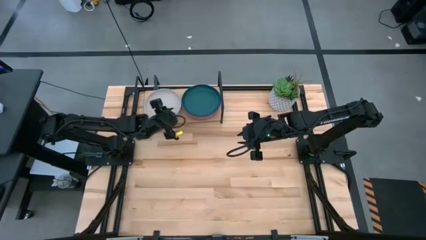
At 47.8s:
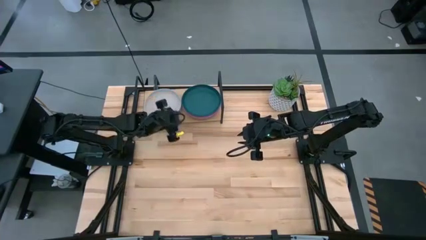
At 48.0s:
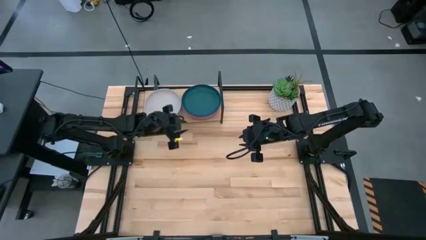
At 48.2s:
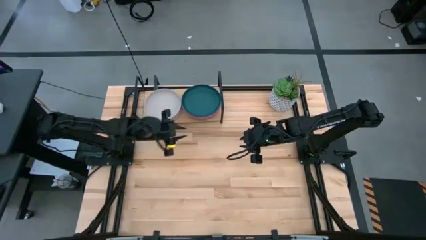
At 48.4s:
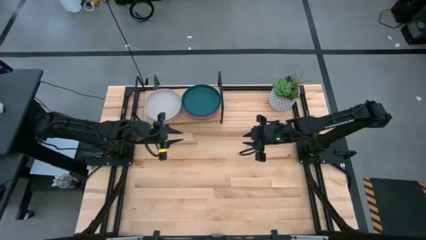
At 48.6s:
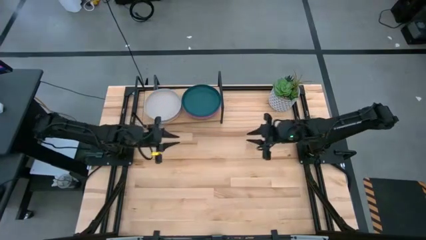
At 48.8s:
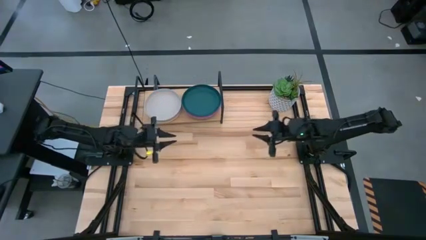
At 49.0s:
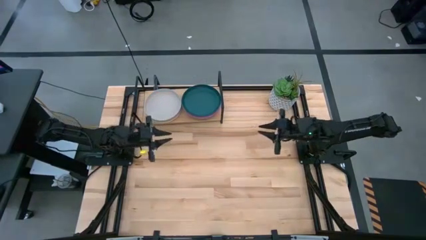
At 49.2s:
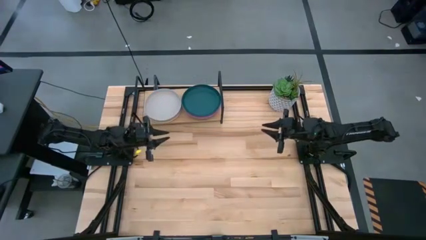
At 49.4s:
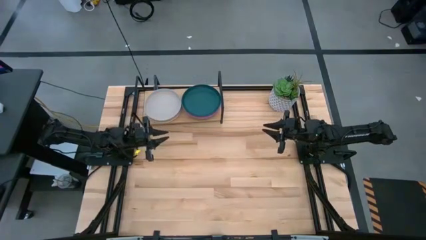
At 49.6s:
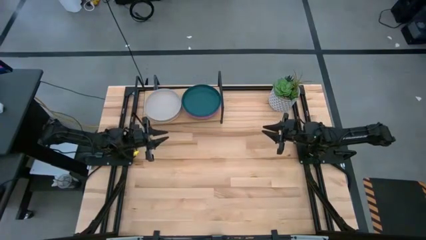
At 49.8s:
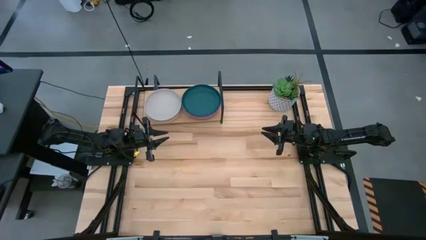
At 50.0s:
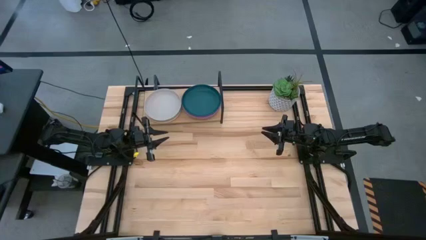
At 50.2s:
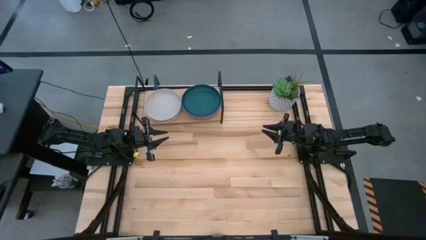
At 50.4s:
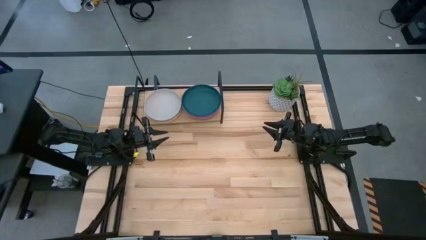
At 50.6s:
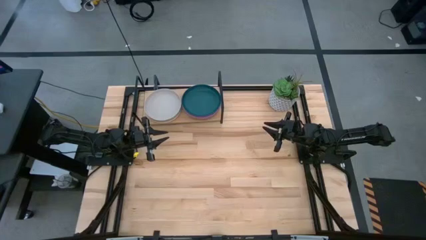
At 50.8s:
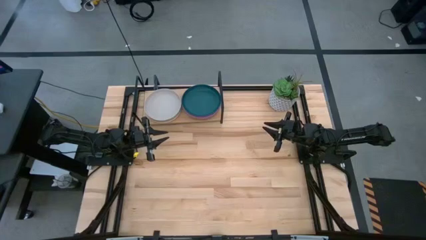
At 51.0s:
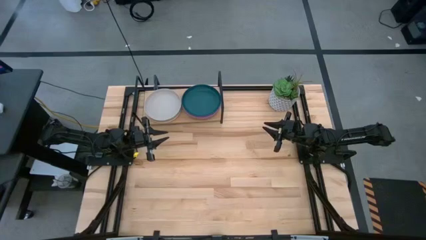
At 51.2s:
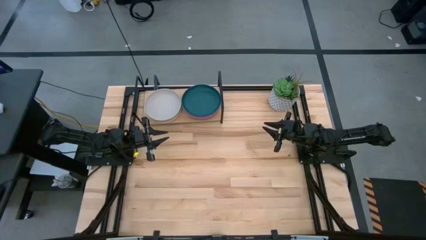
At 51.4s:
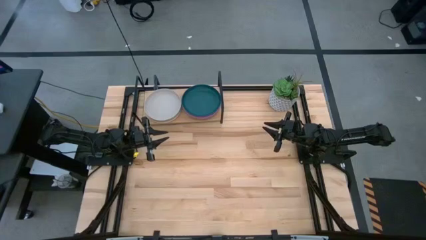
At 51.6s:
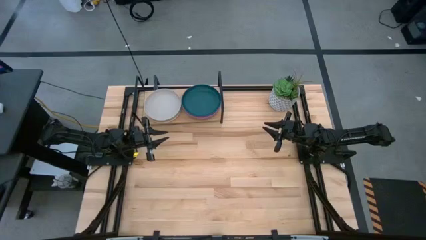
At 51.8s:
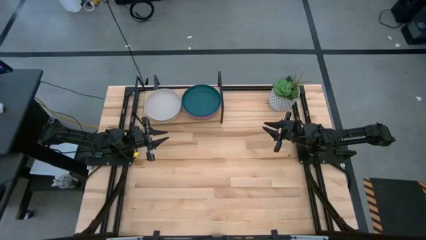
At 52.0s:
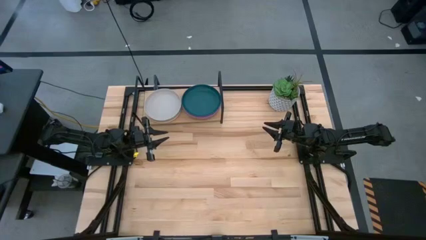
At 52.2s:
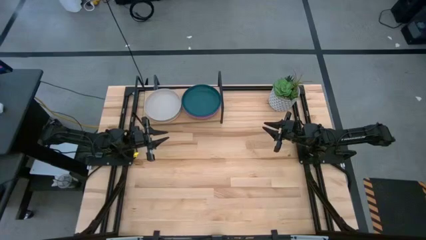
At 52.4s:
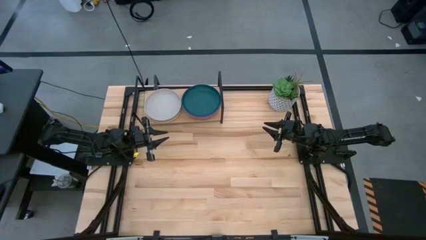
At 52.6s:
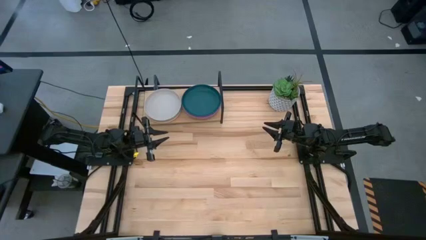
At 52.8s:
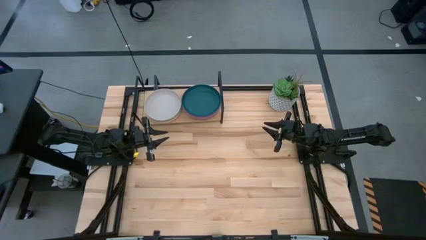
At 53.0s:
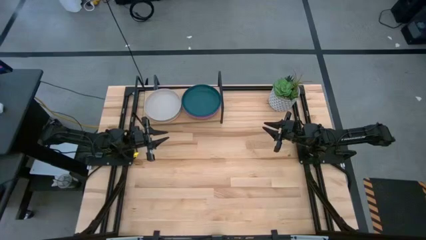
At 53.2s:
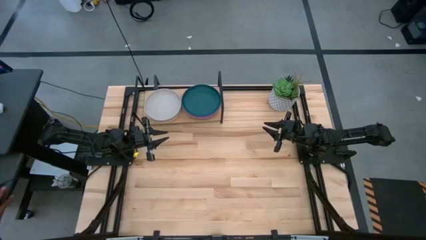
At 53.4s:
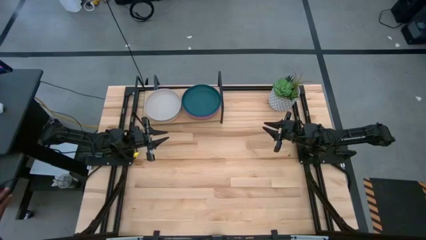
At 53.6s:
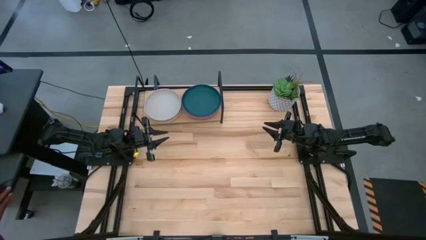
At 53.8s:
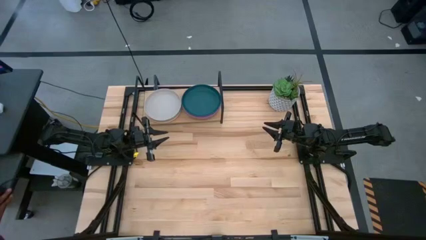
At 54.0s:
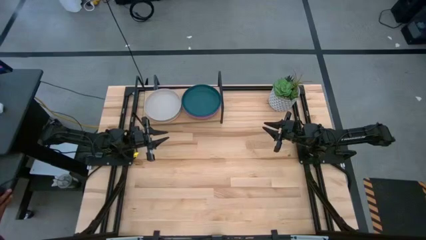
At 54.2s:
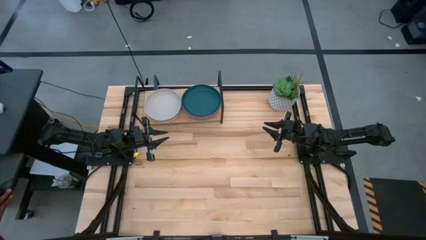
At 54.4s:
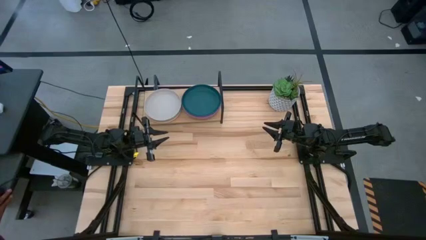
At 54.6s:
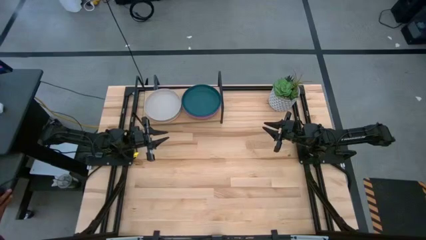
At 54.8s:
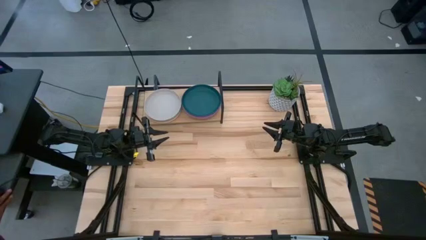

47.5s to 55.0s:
Task: Place and stack plates onto a shelf
Return to Home Position

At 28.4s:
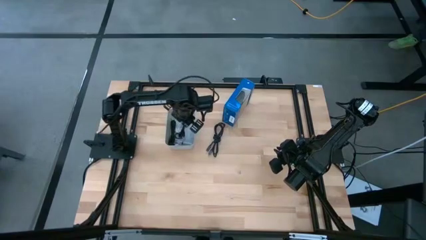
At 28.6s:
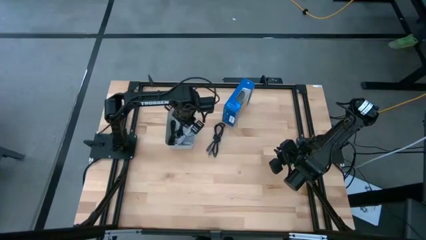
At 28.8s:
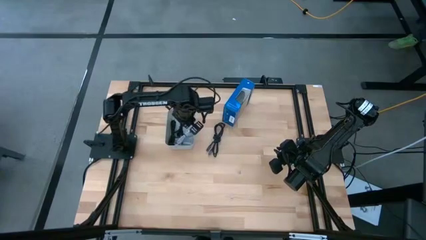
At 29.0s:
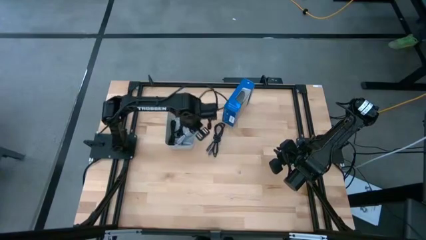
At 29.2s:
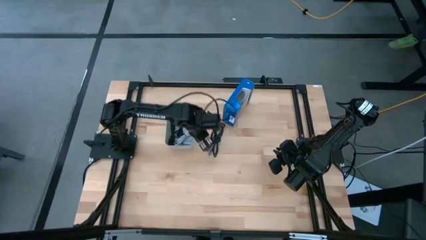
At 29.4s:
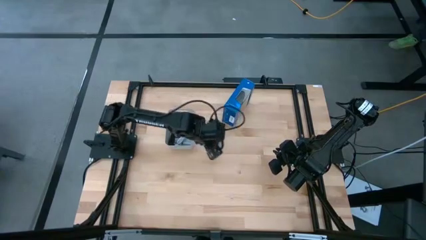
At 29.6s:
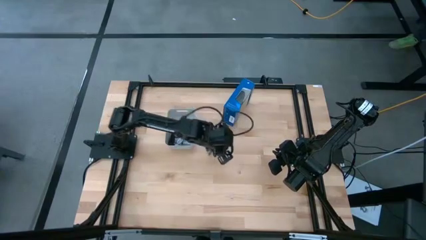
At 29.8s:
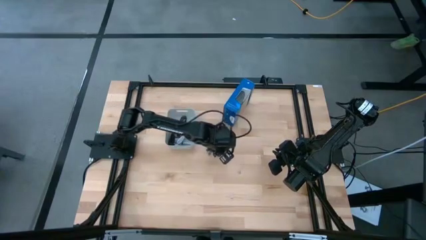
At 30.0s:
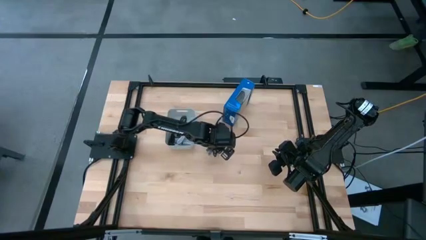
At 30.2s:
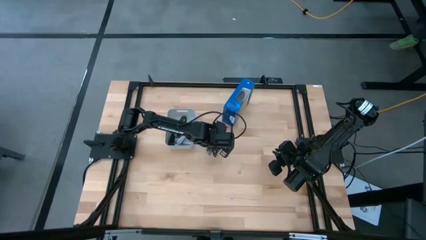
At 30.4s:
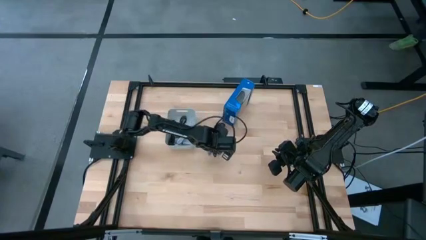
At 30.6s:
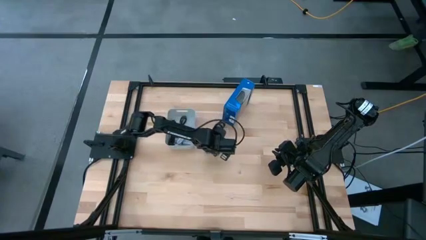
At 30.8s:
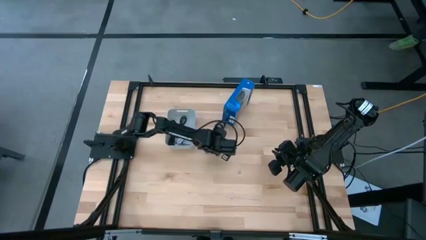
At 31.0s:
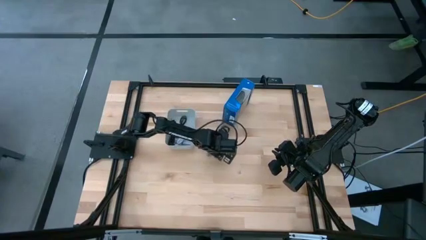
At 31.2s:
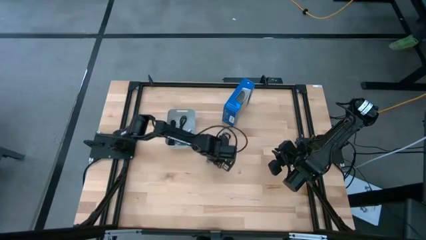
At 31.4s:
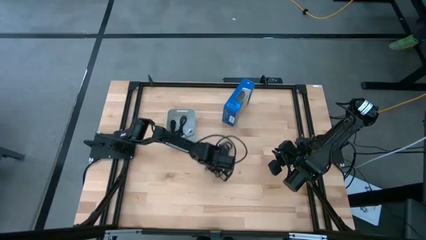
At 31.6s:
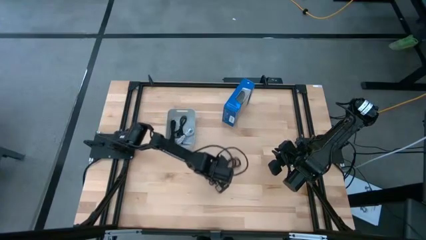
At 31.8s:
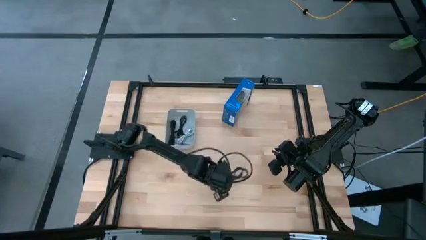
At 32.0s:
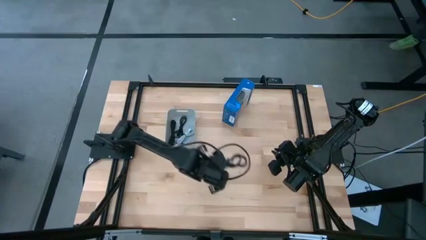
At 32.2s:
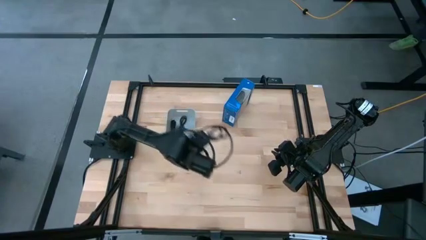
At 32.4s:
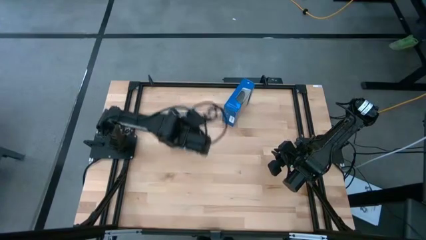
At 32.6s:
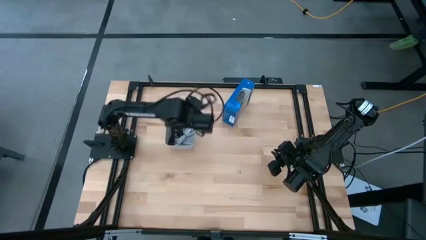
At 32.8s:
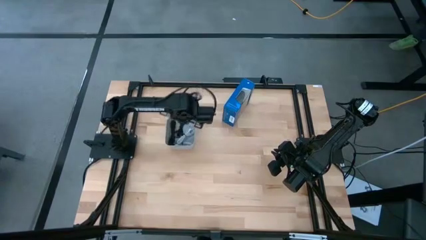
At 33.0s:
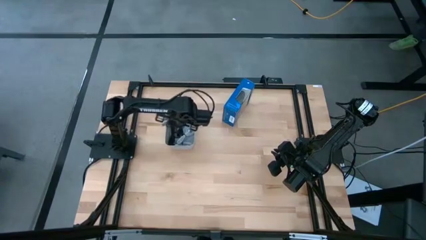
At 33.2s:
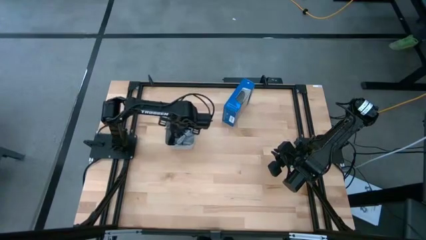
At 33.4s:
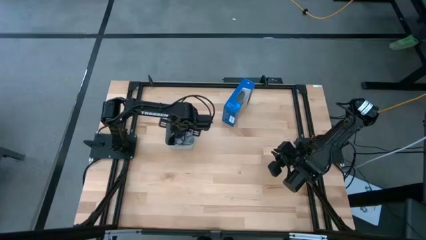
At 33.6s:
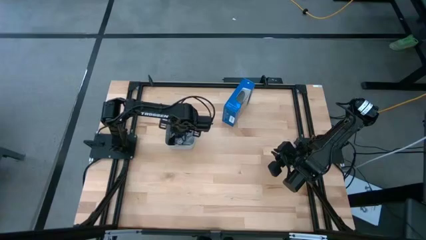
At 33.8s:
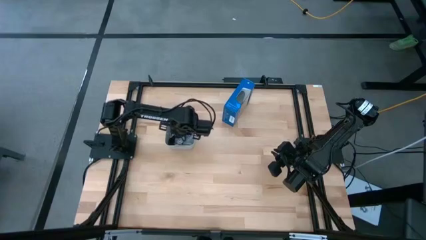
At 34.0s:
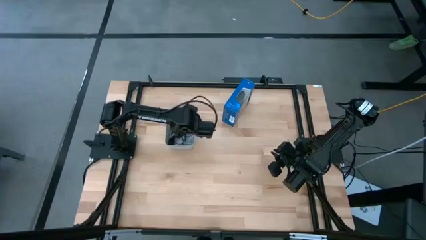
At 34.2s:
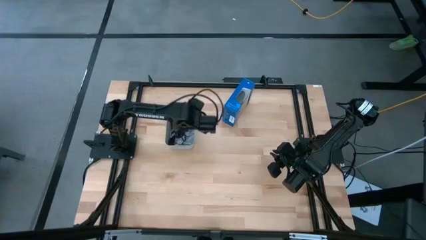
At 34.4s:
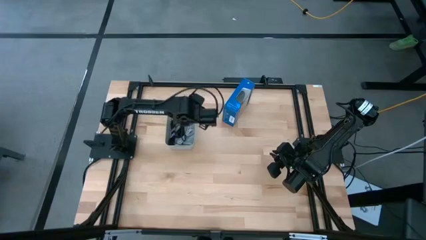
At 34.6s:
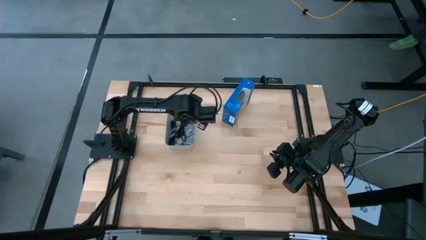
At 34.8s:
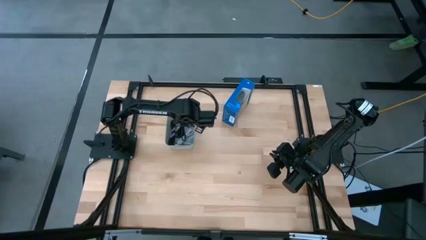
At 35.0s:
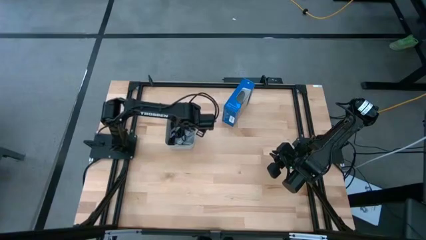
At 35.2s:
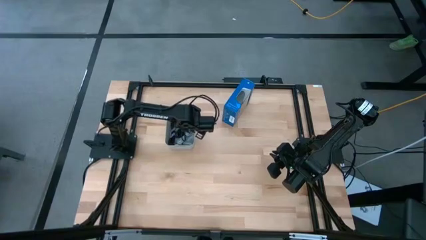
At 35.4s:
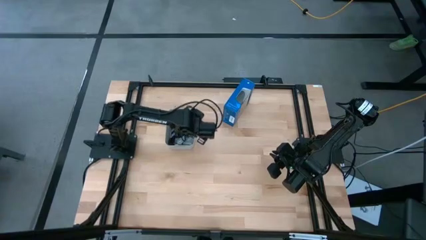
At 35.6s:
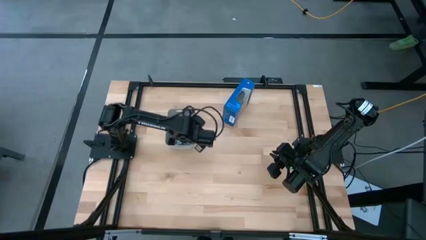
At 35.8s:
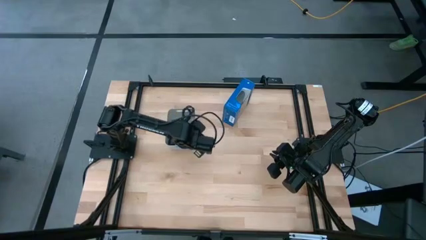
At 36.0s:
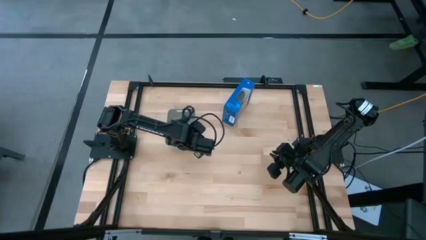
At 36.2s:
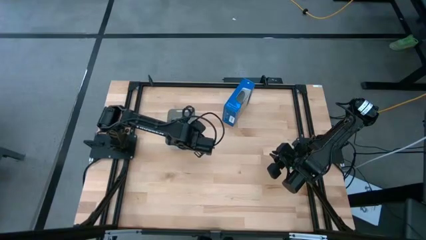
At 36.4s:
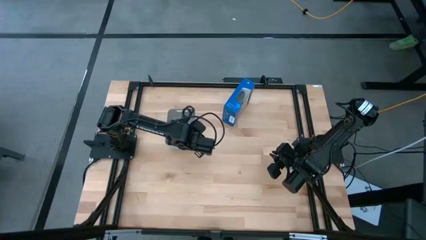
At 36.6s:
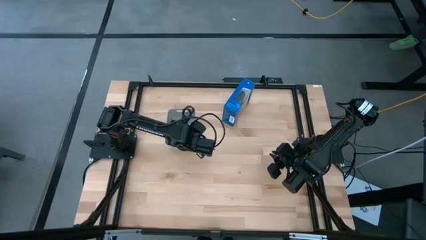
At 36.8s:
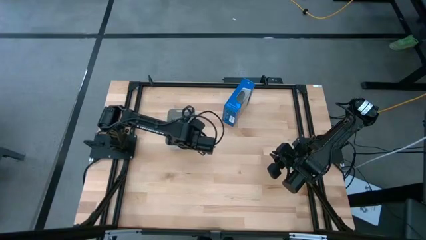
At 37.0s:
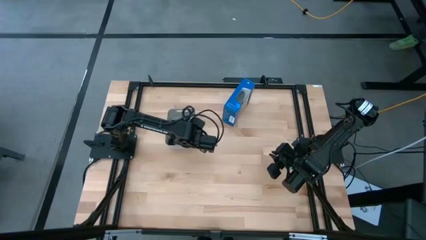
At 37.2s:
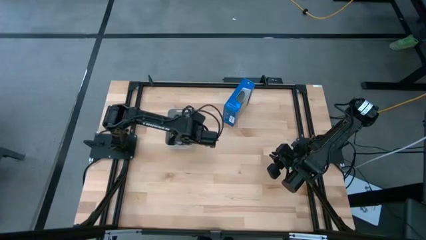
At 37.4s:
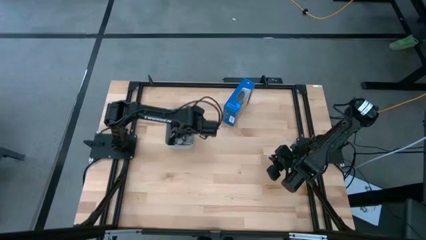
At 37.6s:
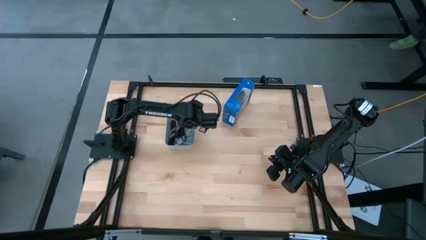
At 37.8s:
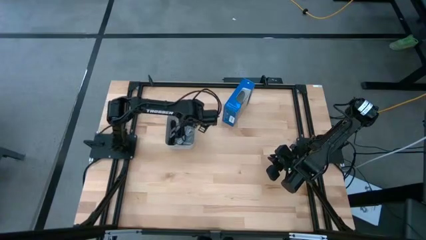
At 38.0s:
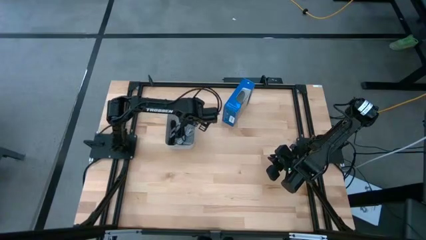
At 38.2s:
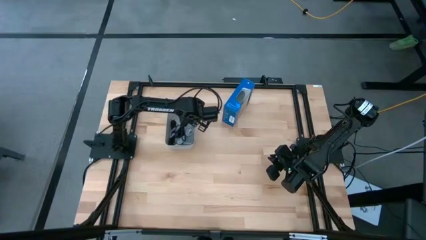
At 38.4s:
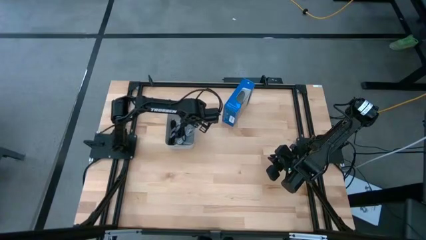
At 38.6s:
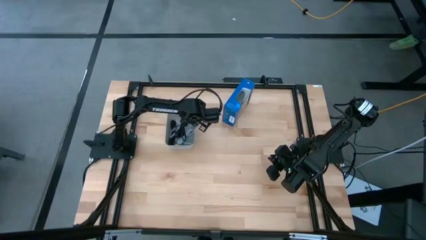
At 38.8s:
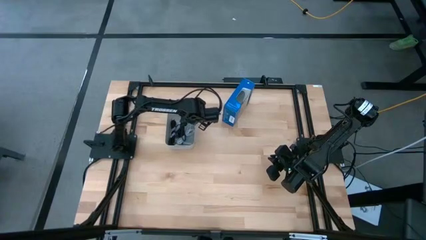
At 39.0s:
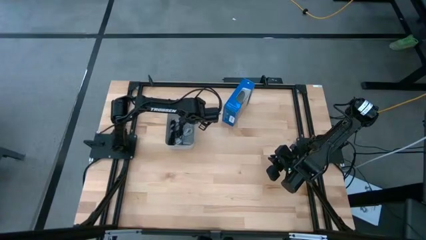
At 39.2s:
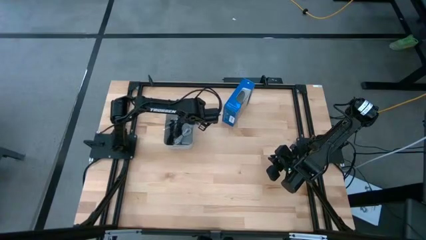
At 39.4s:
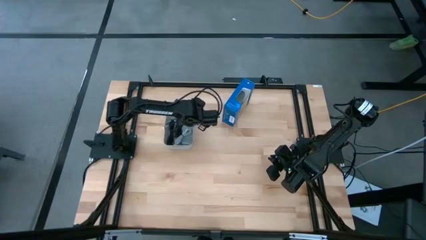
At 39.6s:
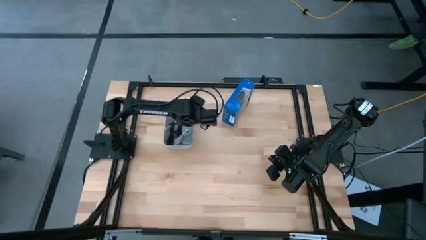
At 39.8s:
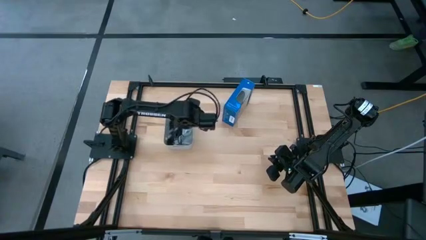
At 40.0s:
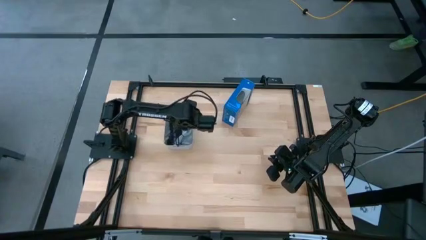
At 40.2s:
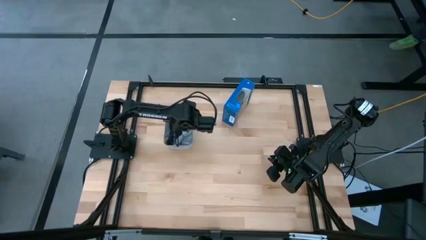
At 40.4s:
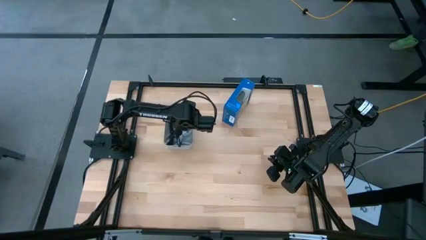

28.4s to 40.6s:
Task: Pick and place USB-C Cables
Put the black charger cable into the white bin
